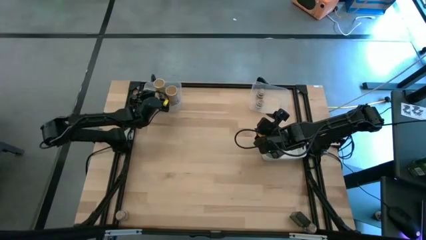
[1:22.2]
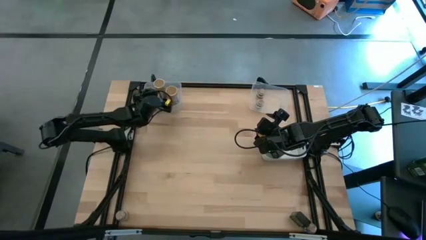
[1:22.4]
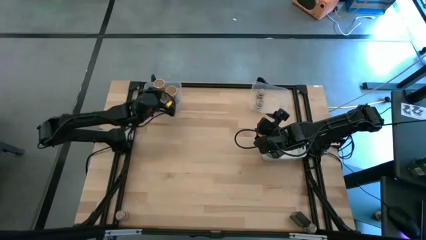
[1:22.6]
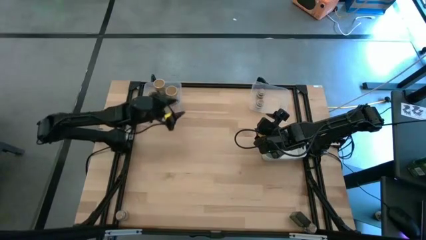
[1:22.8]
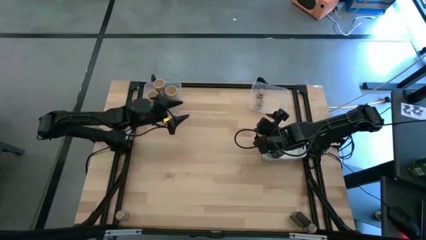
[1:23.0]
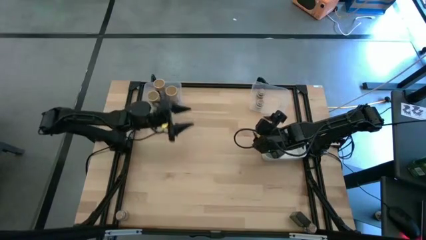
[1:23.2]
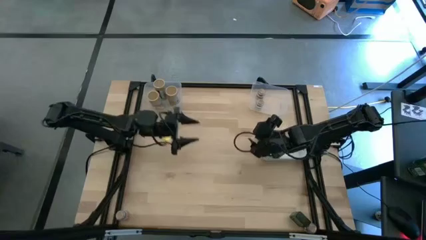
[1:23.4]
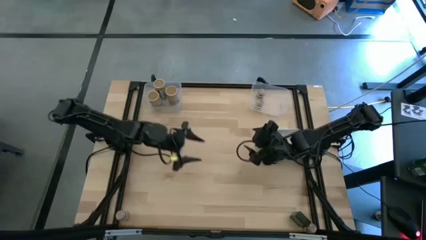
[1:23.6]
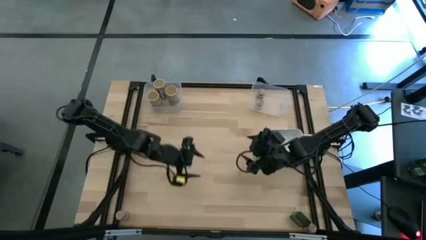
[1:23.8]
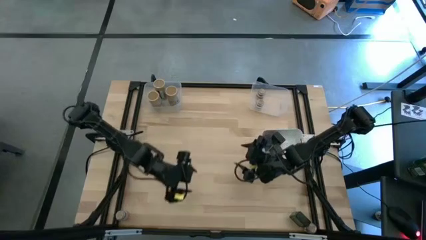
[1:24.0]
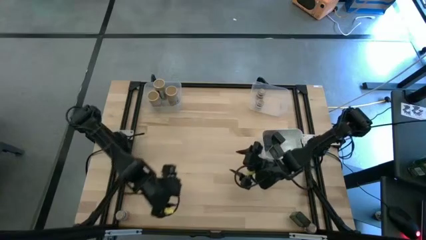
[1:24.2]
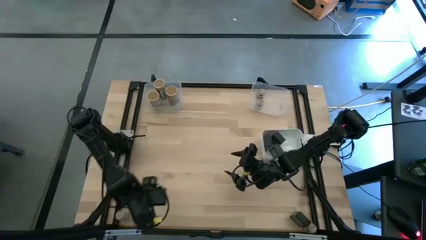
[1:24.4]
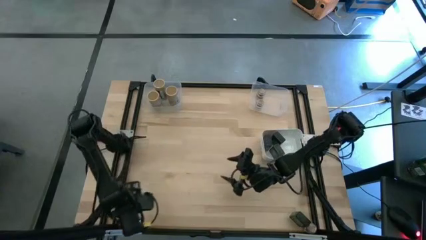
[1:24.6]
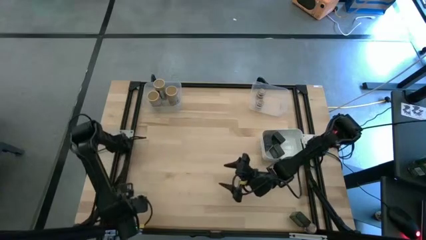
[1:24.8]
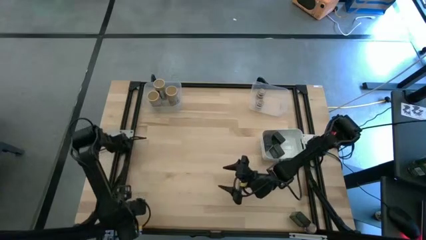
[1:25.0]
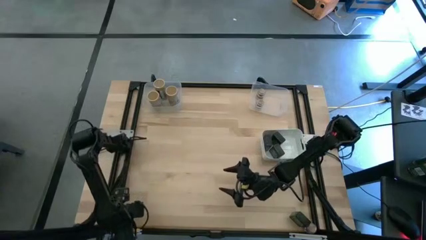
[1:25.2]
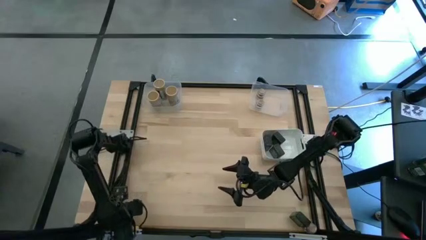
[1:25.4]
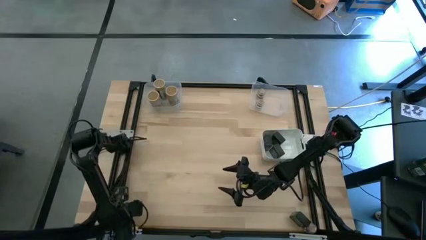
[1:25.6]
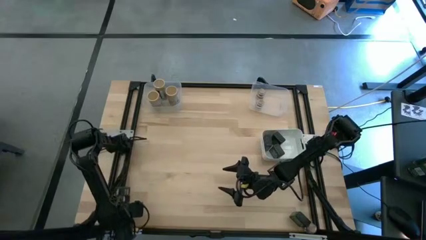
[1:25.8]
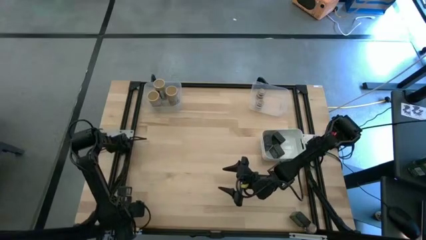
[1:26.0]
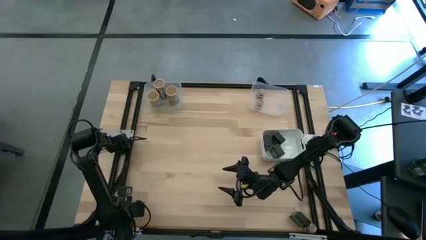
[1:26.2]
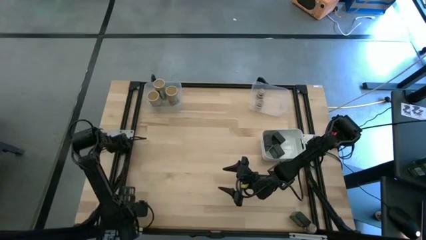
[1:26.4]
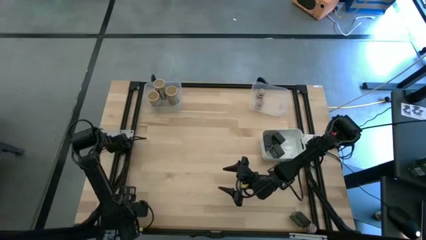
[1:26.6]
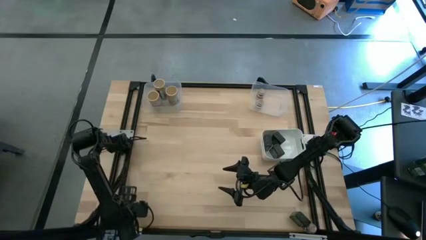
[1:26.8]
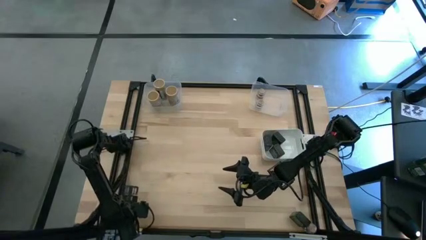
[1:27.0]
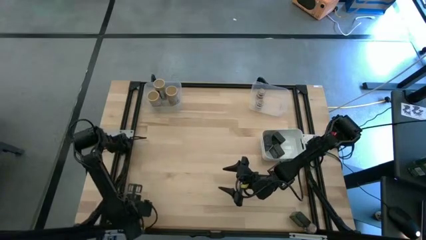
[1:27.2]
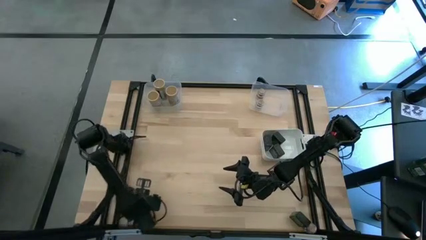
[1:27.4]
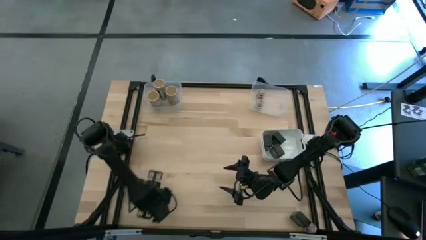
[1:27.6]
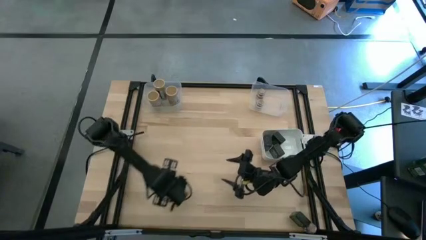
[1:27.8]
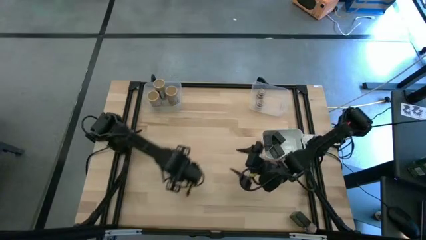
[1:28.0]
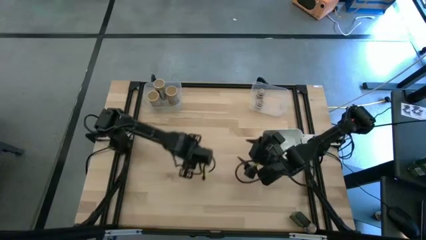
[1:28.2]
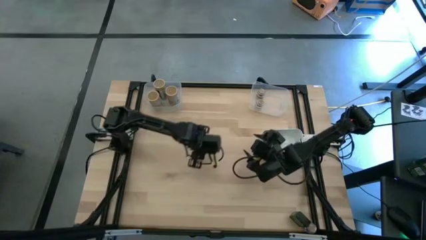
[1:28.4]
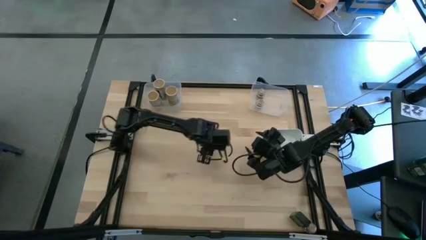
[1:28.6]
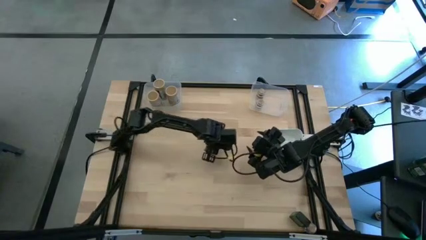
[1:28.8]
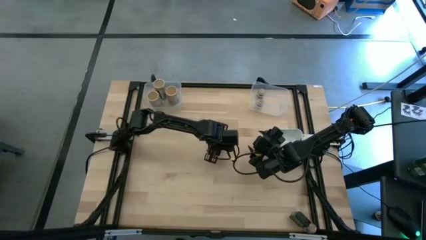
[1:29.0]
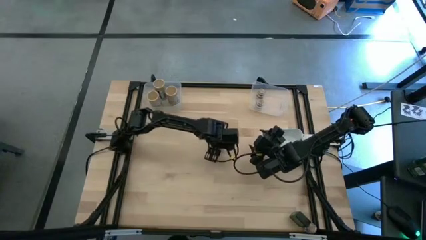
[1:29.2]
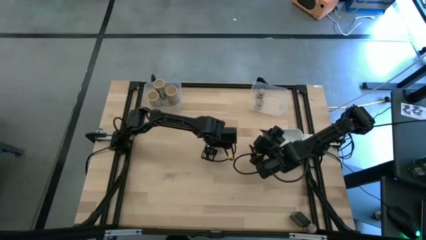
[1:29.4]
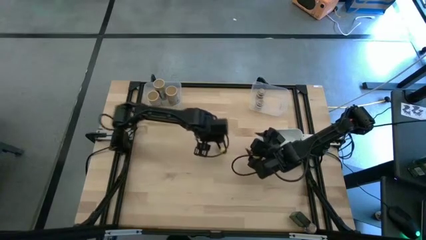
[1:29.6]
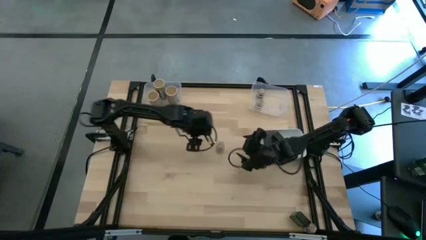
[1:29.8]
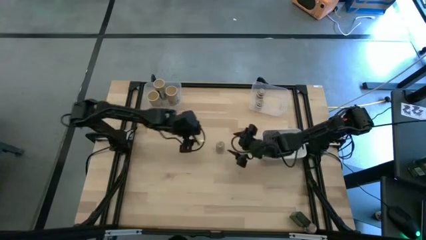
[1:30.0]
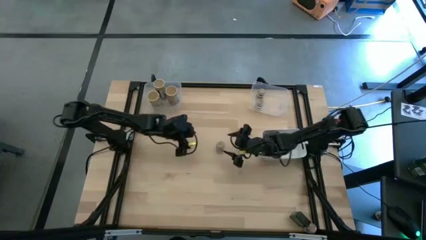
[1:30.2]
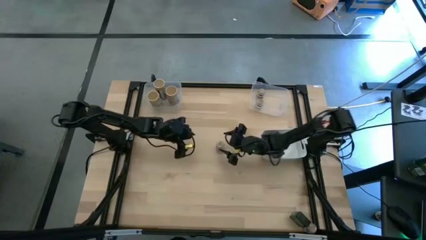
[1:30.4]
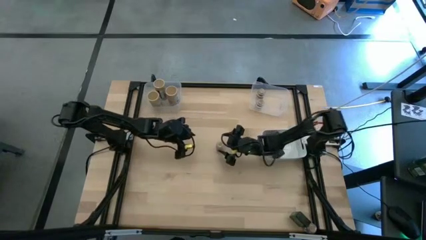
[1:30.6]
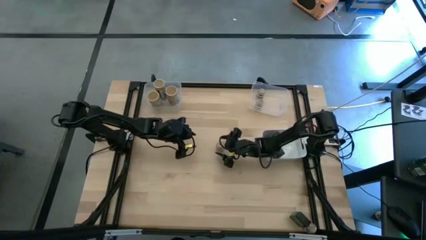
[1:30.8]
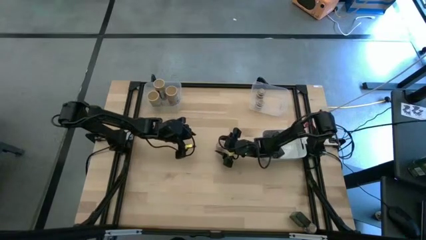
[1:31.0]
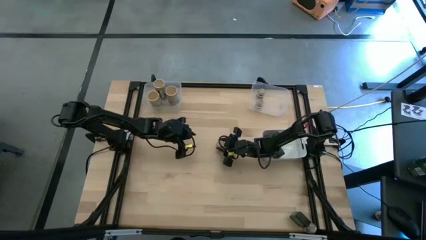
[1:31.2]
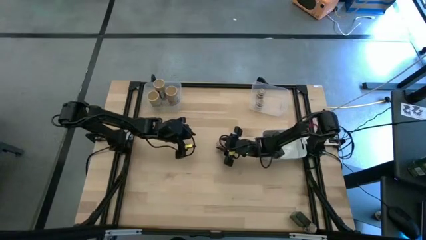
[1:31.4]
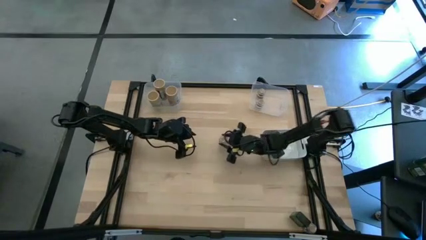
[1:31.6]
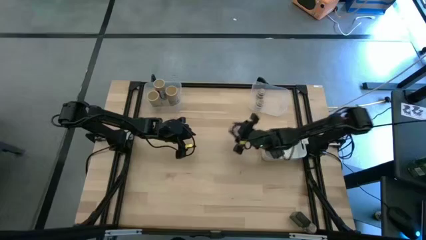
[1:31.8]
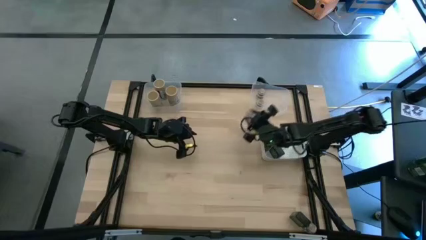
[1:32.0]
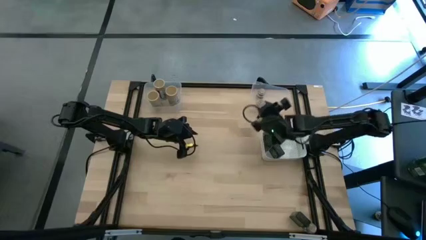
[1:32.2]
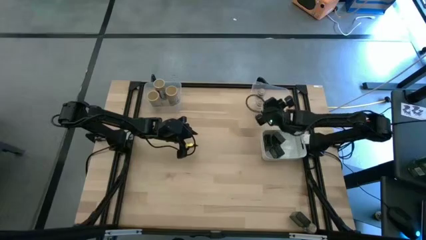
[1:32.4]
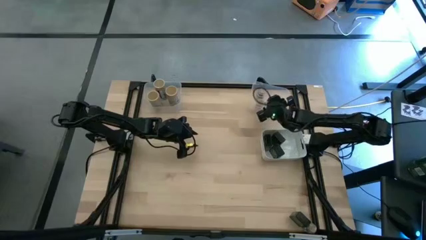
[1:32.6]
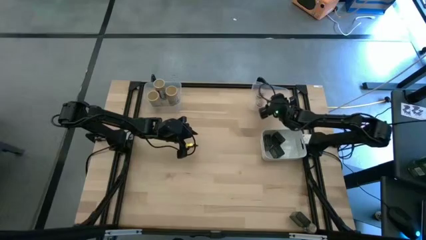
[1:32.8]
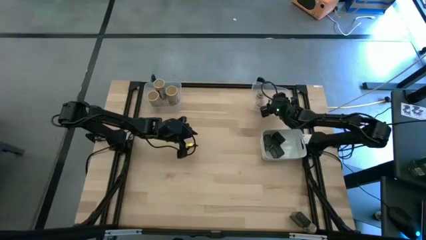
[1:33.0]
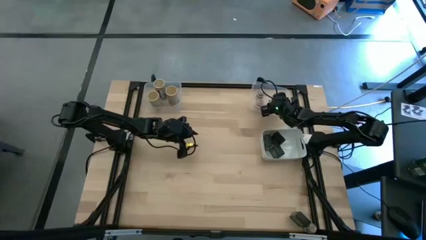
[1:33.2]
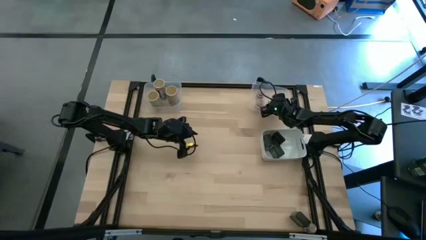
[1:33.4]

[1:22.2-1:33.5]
Task: Sort spices by type
Put the left brown seasoning bottle into the right transparent bin

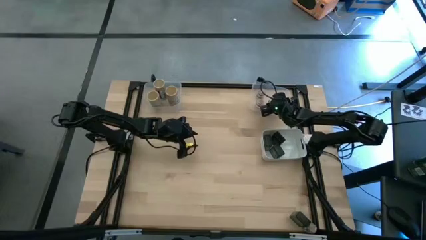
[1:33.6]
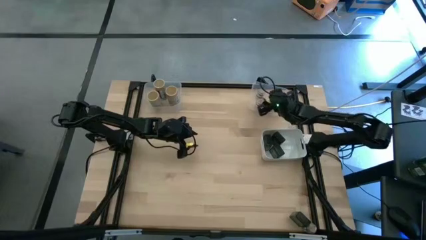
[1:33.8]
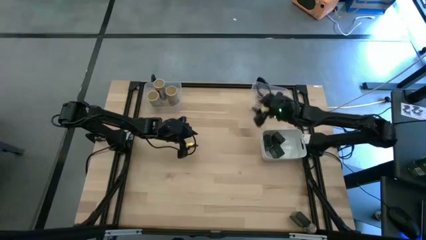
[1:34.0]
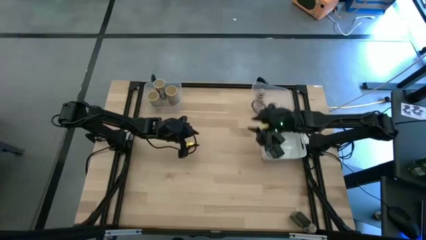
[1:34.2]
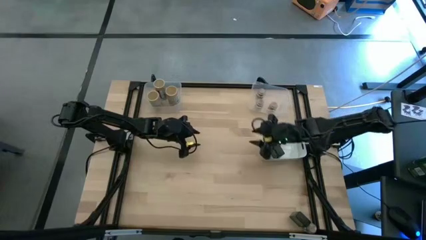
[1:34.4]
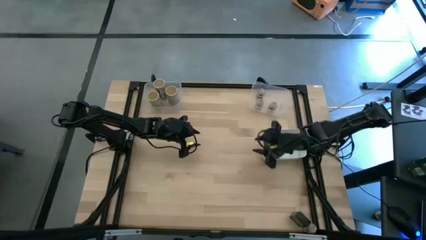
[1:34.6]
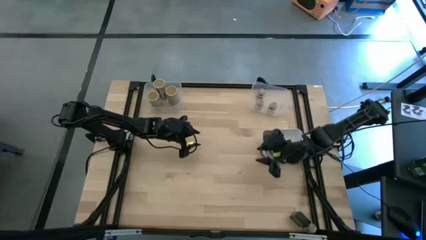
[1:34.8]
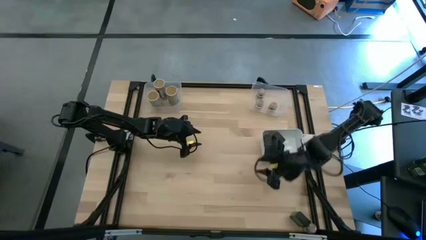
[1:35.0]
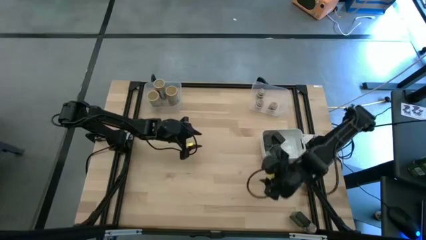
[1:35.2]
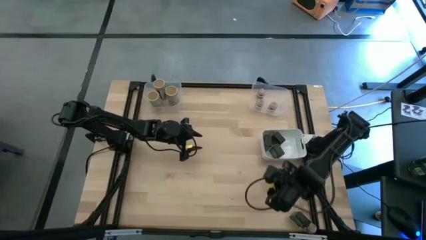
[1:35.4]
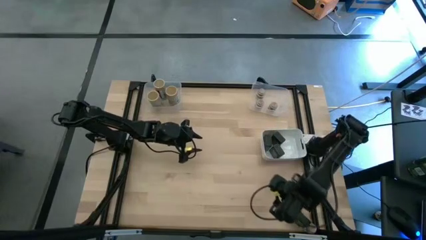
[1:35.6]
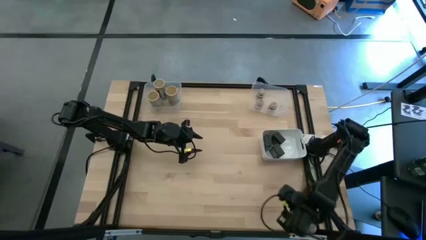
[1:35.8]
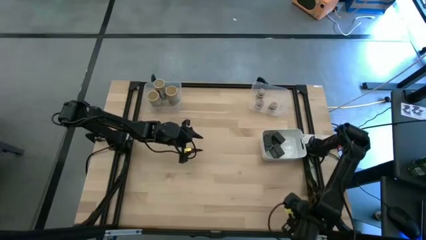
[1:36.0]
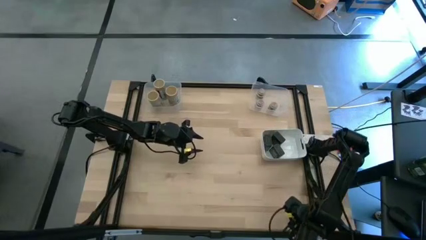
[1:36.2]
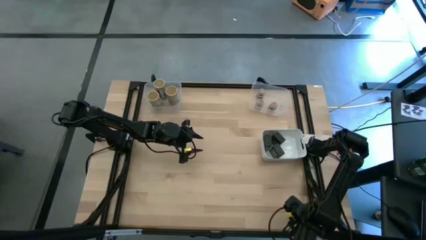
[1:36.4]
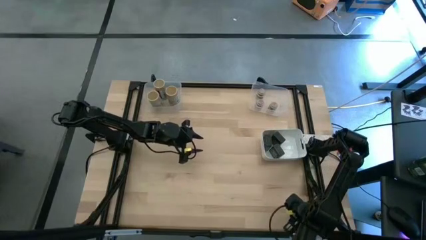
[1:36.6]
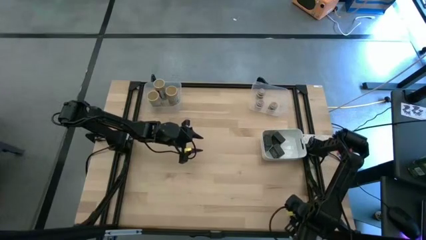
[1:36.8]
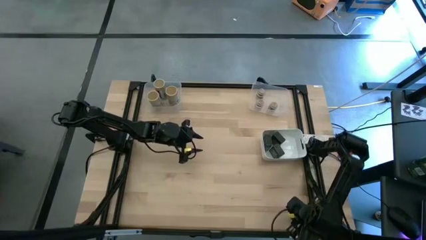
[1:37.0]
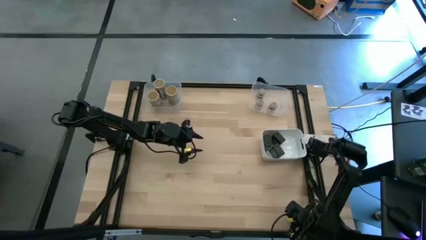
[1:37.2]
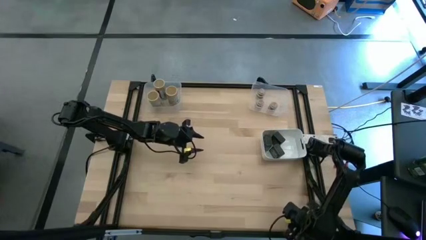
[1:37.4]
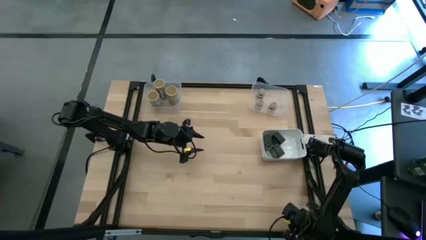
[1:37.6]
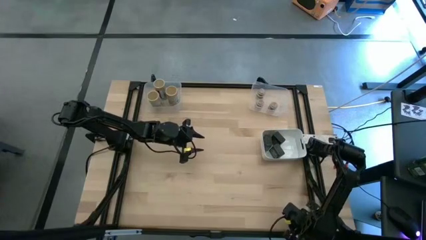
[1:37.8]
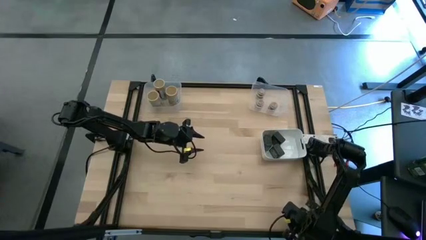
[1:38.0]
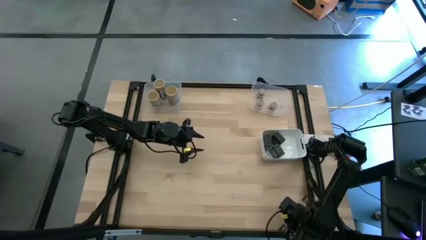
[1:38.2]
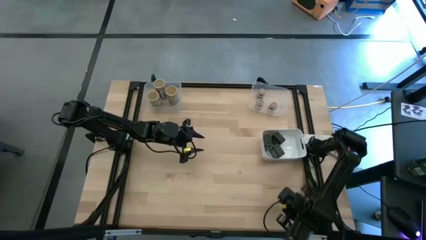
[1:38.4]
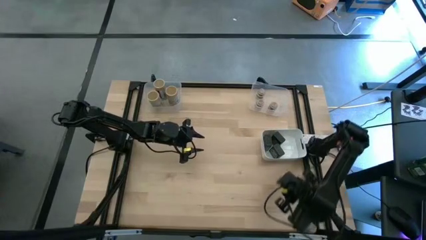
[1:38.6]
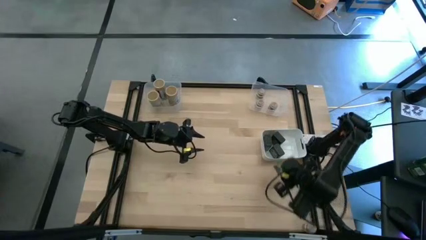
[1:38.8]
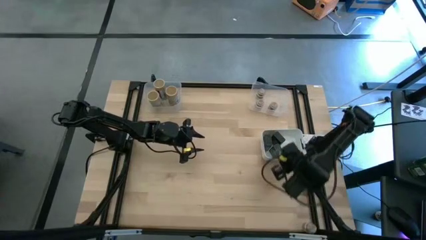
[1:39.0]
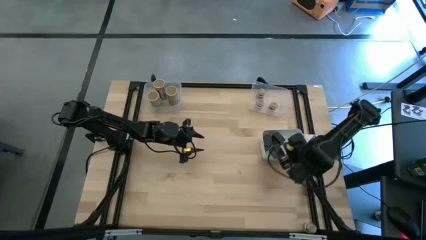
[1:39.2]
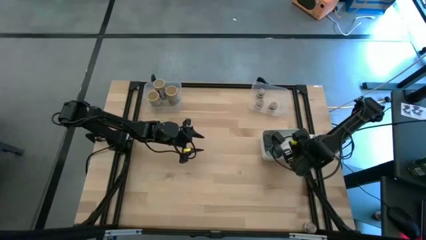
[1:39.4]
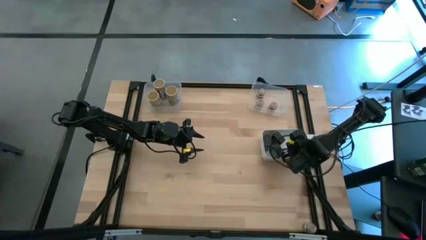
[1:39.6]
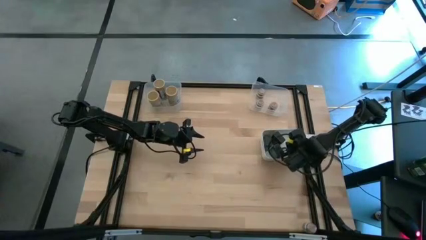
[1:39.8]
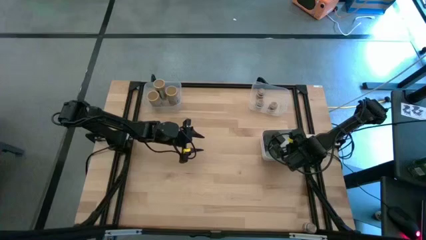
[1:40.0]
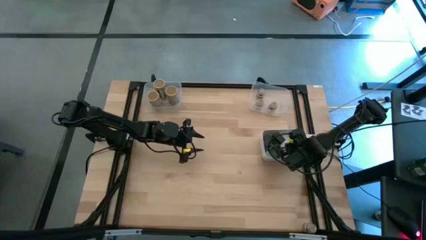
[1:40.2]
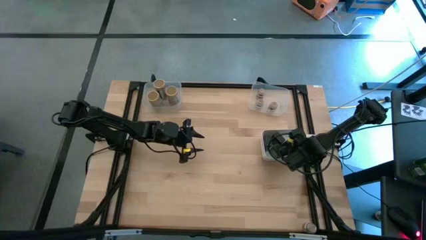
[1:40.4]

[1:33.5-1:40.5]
Put the black seasoning can into the white bin
